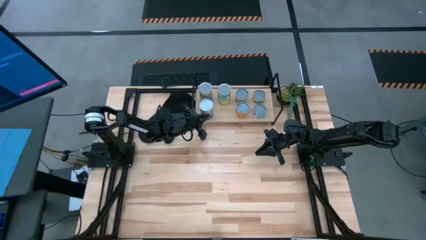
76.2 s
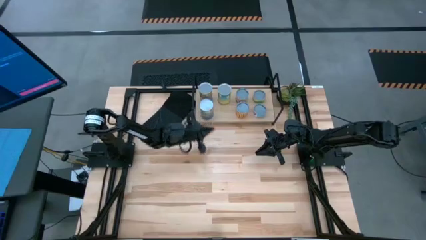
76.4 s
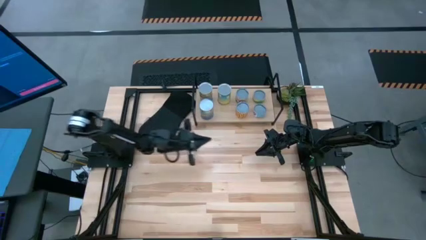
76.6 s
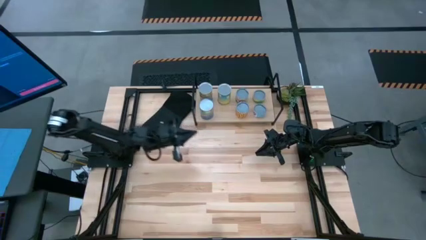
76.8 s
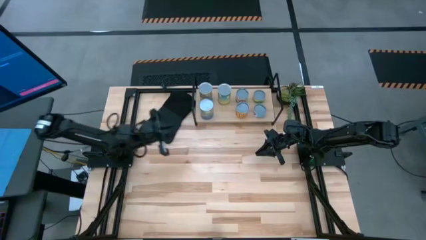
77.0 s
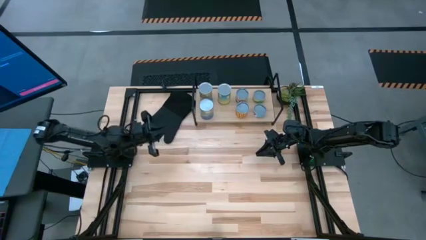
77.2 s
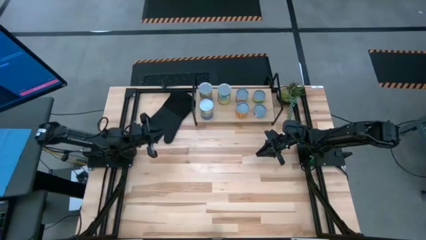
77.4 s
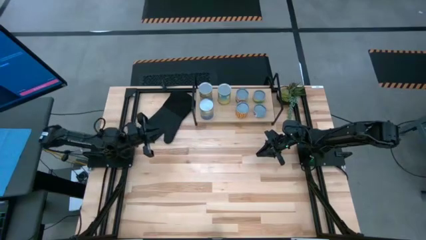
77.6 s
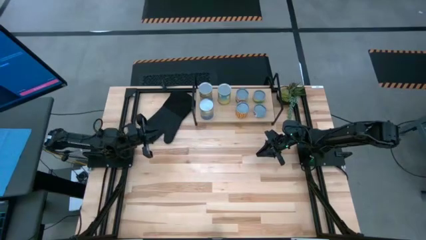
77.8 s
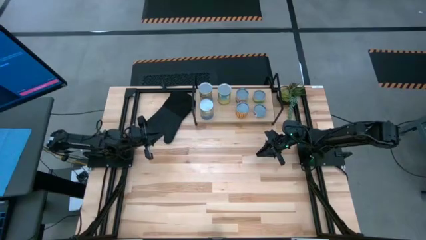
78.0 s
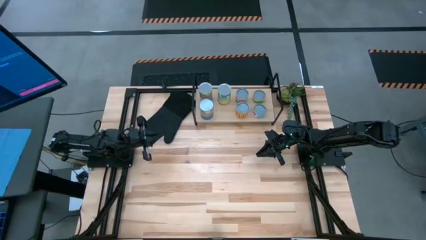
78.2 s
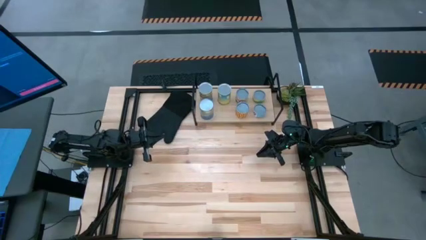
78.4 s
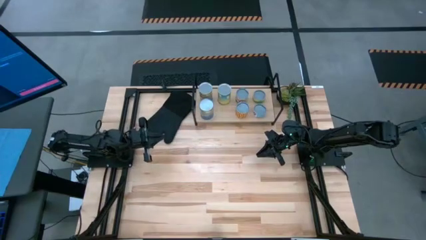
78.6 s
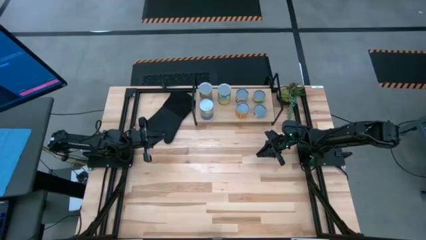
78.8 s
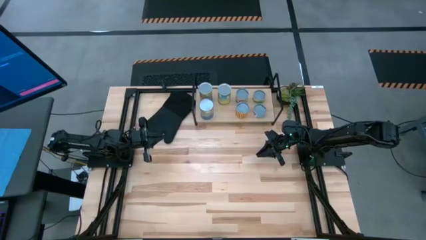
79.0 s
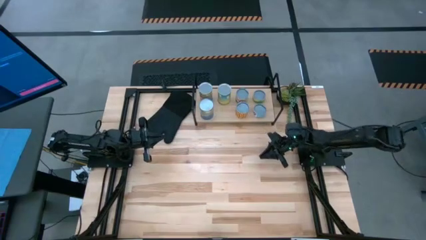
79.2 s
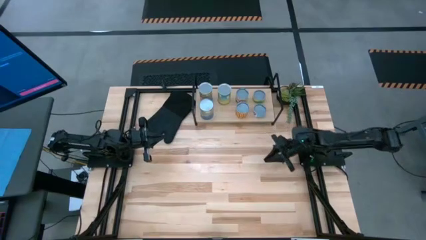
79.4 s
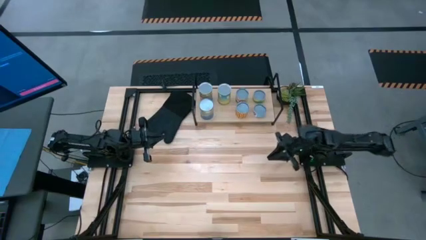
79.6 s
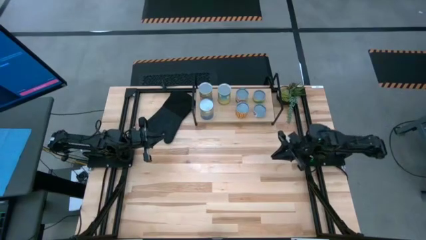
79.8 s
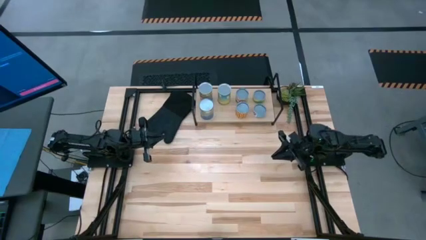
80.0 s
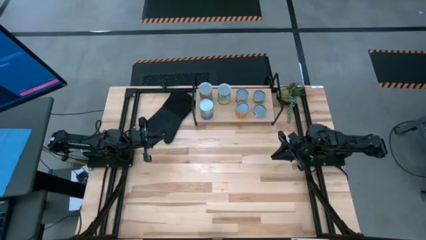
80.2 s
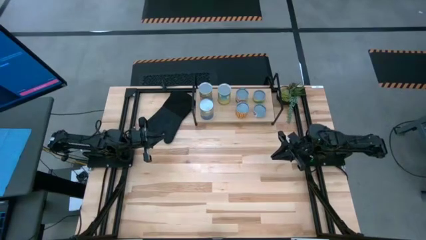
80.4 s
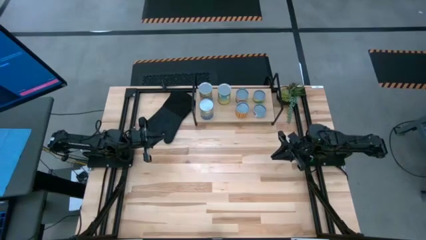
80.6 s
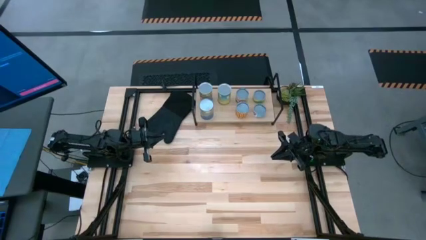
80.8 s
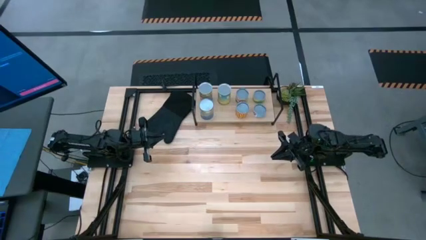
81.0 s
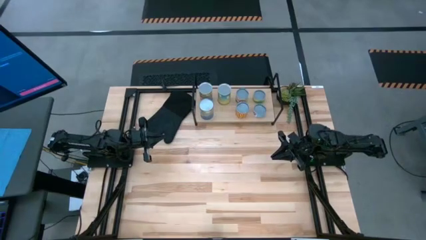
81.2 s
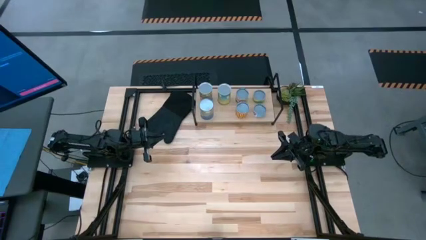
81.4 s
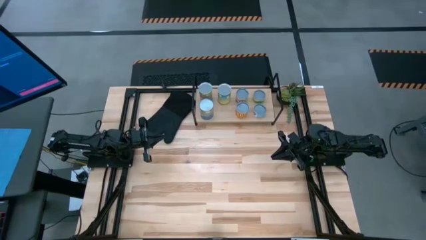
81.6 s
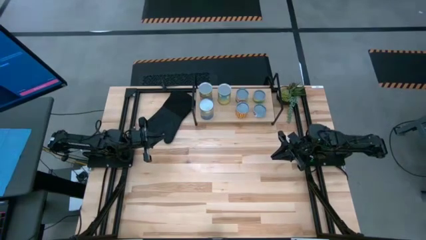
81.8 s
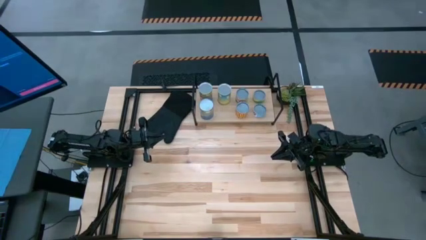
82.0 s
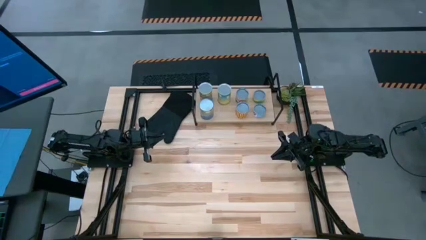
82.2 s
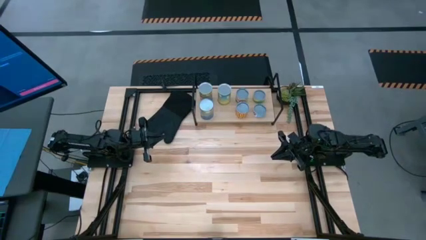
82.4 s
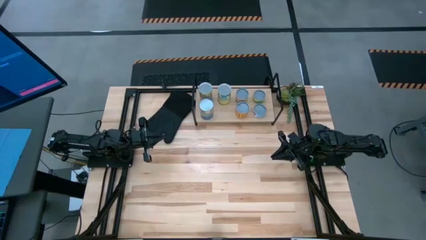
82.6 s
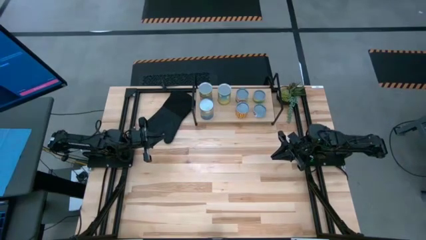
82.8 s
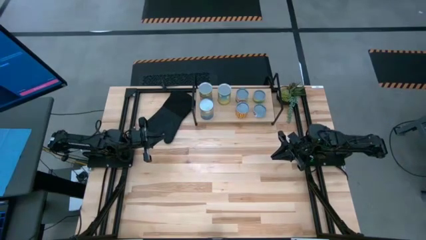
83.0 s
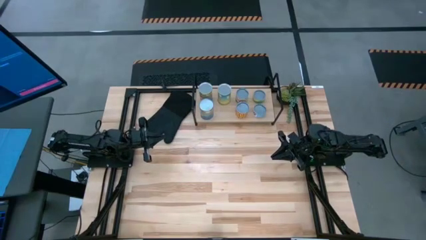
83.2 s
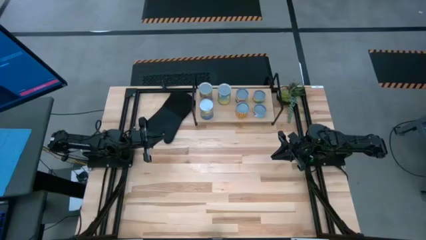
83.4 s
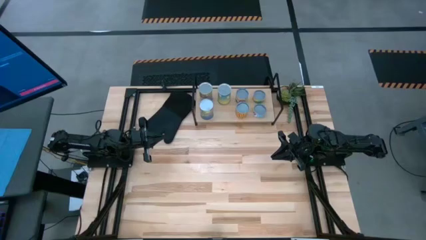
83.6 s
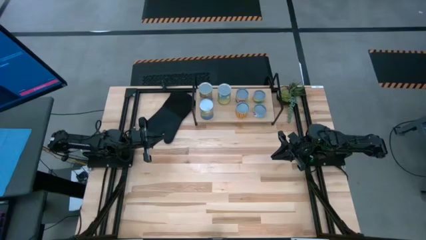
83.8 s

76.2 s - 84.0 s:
Task: Pick and place cans onto a shelf
Return to Home Position

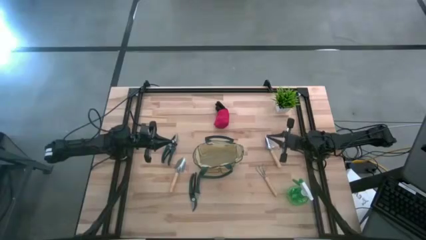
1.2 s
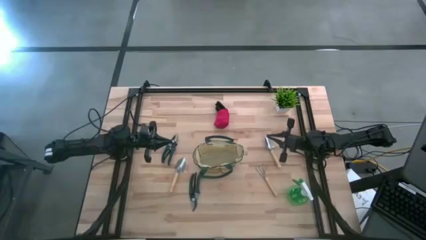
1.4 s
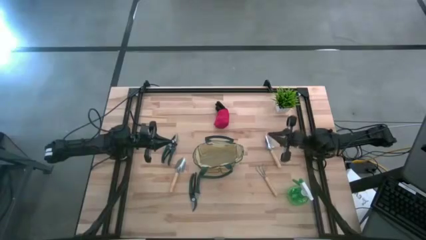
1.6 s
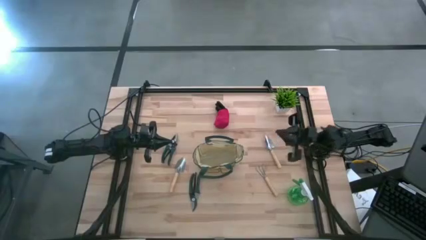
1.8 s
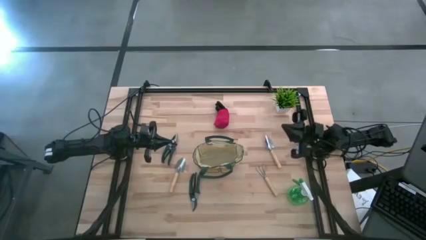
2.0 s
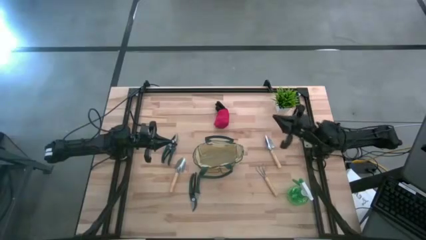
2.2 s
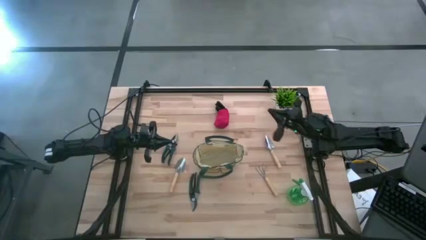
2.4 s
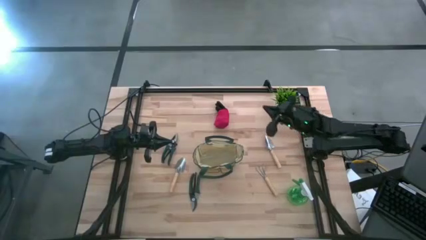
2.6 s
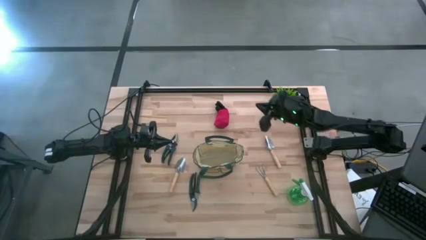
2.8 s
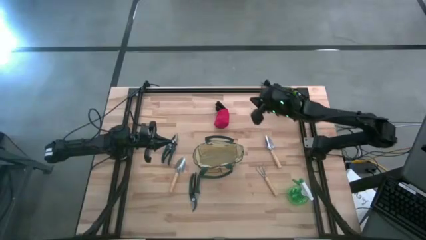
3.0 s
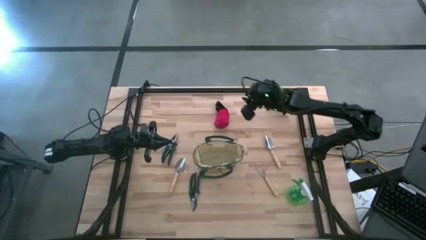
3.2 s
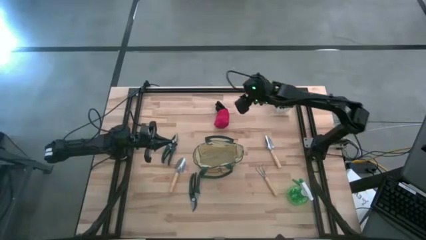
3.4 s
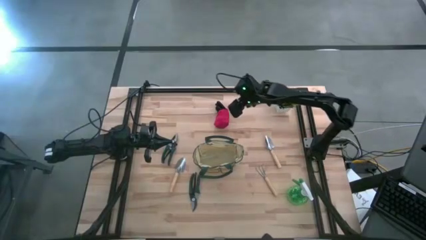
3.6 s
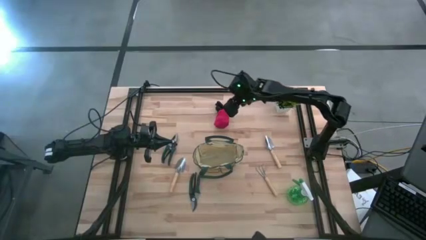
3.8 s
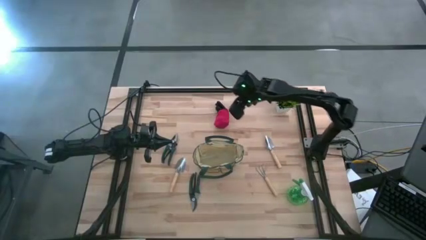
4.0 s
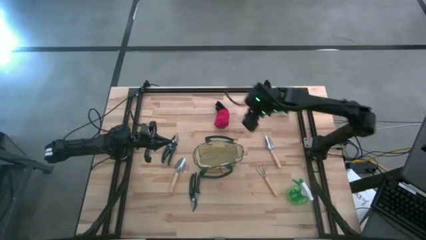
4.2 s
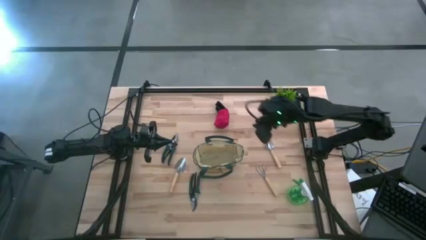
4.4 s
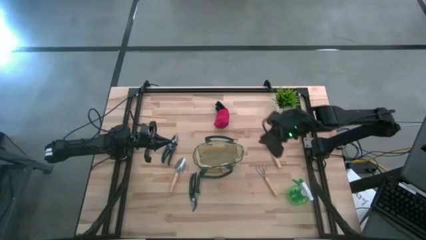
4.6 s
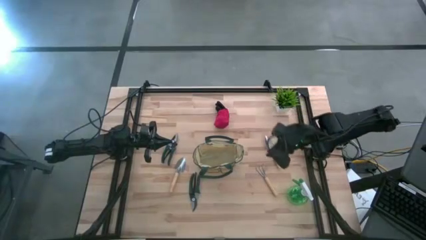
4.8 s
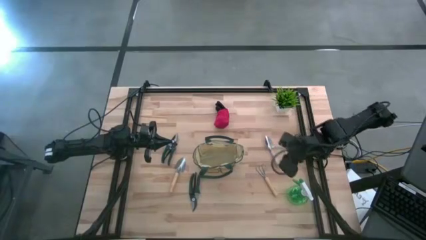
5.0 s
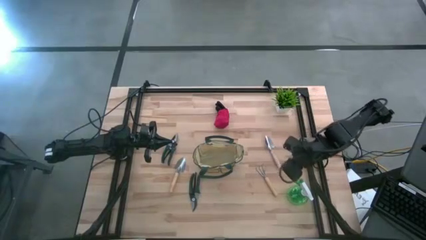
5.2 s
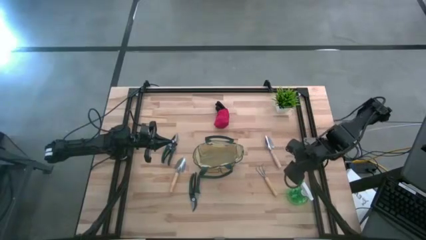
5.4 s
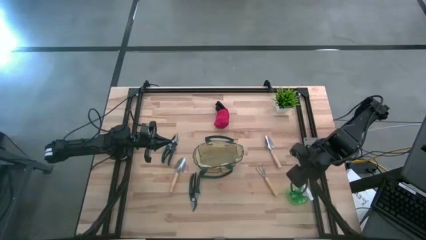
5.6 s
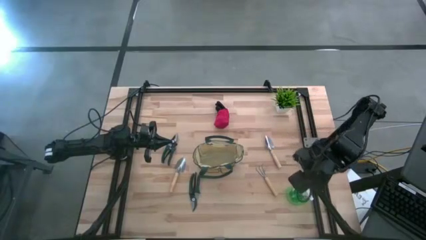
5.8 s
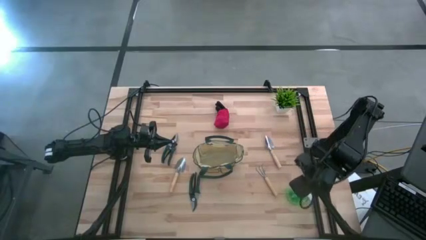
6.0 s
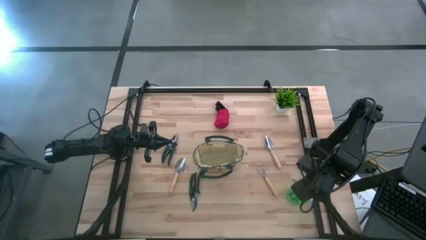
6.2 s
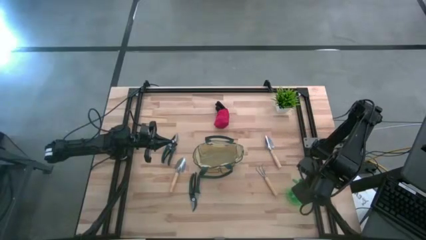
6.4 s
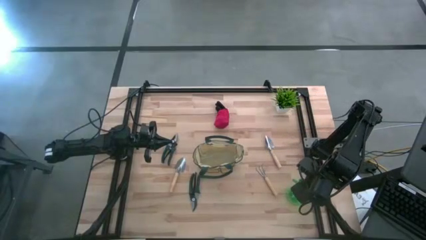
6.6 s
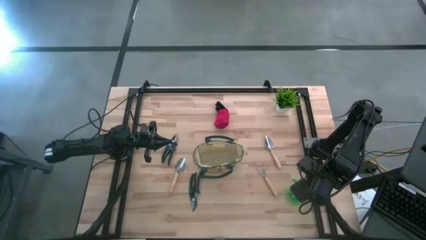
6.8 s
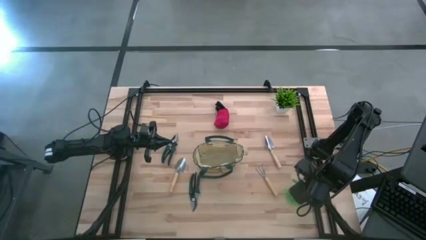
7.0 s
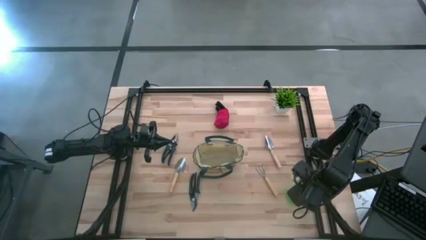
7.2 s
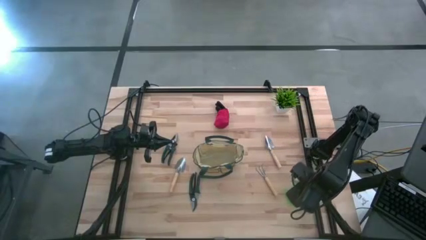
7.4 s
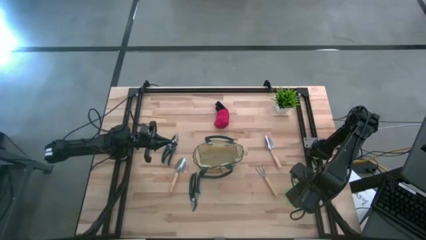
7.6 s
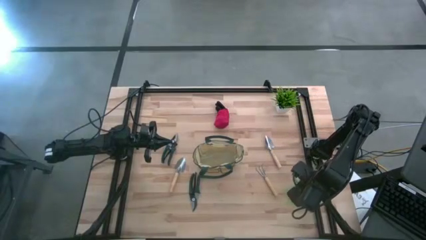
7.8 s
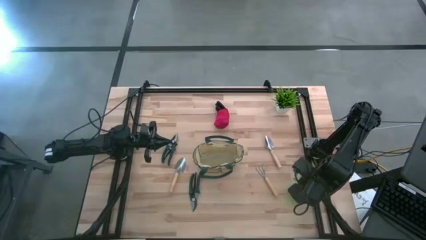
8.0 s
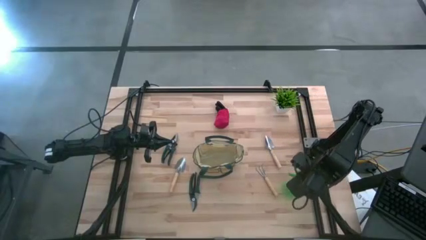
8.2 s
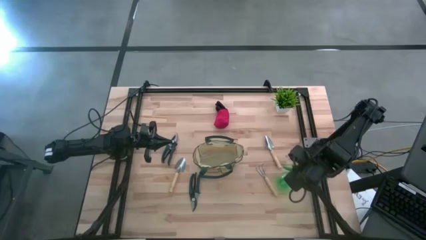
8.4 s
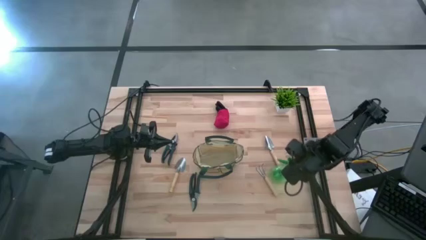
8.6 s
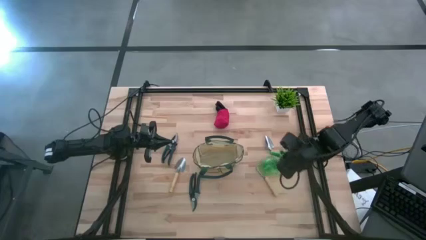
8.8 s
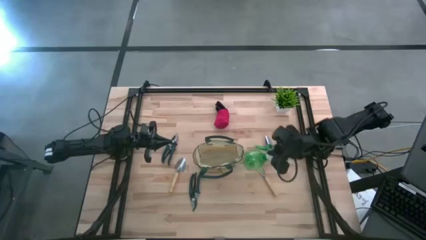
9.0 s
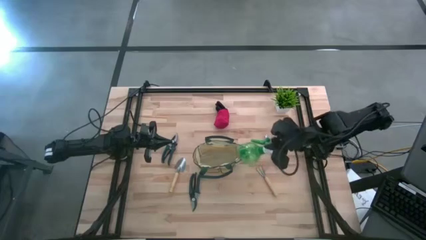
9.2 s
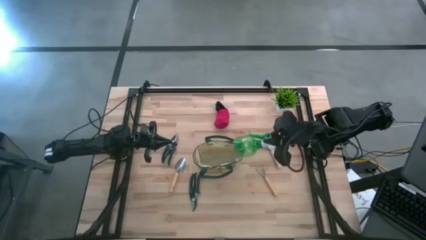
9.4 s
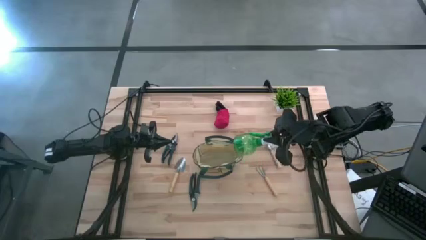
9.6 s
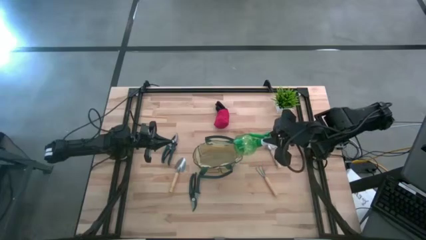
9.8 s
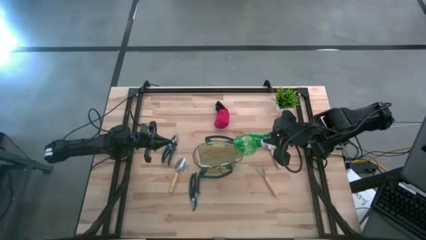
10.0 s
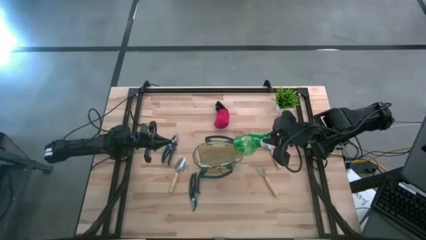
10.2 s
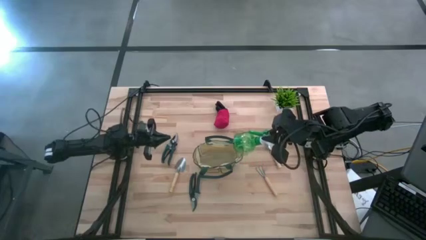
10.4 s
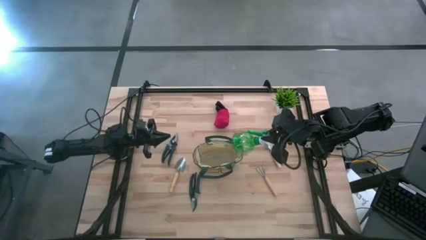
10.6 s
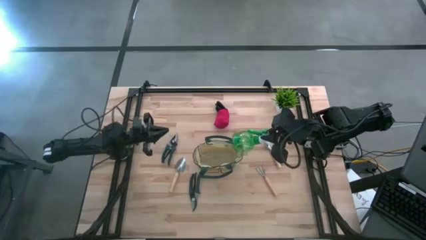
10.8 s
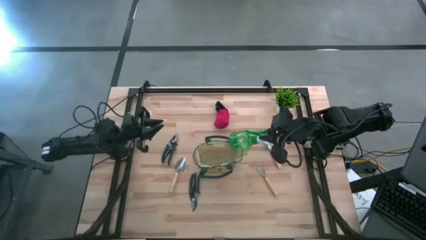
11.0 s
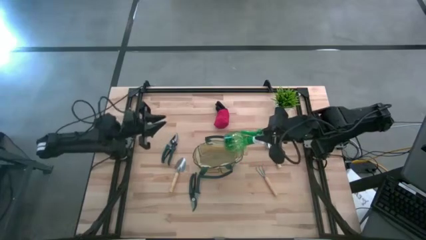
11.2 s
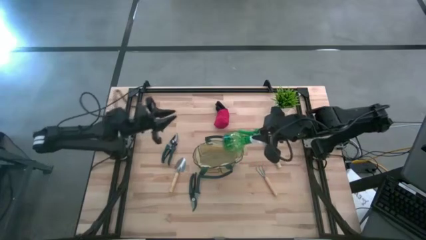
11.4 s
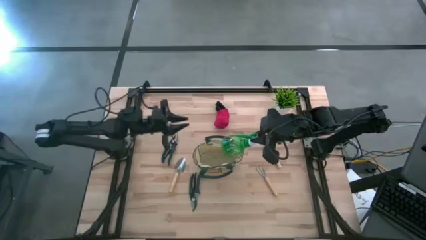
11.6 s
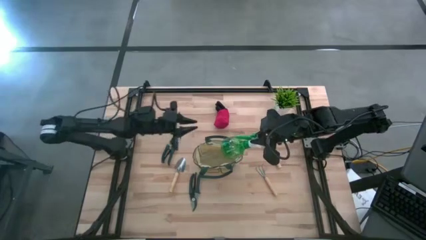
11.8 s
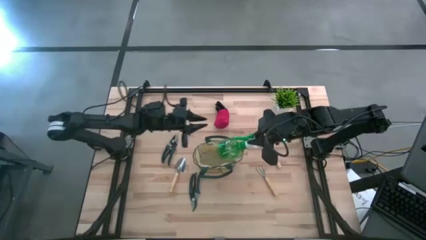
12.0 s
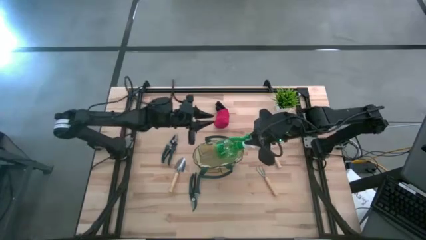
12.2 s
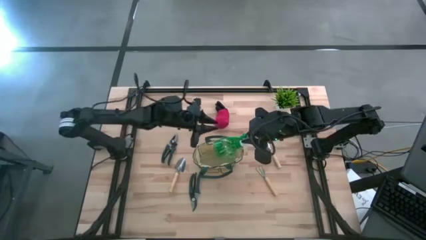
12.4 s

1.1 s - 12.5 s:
Task: Pick & Place Garden tools in Gardening bag
Put the green spray bottle into the white gardening bag
